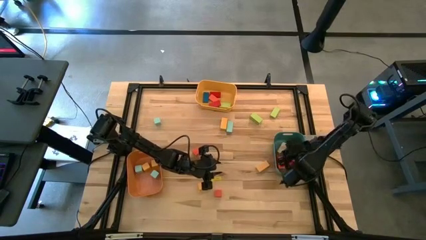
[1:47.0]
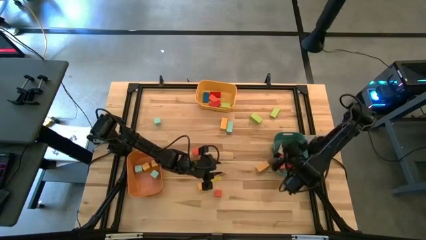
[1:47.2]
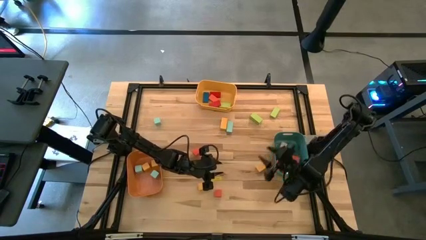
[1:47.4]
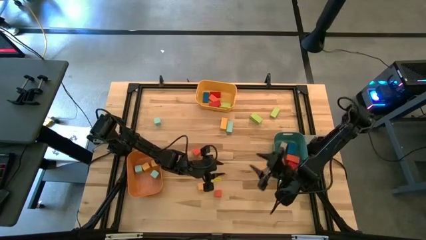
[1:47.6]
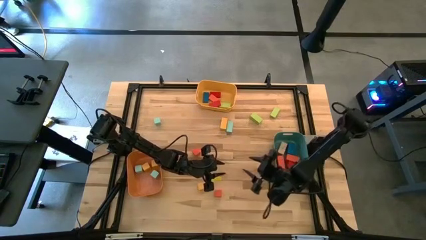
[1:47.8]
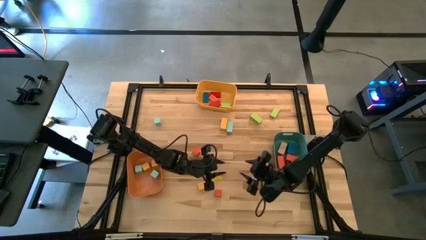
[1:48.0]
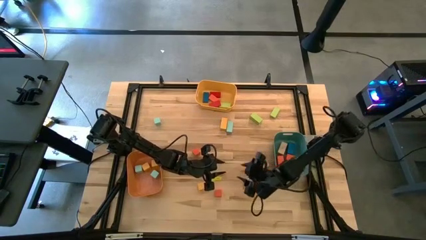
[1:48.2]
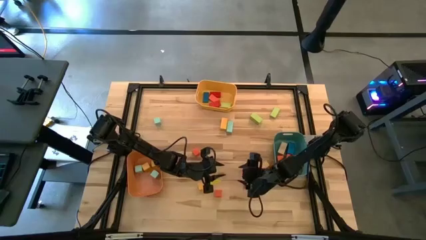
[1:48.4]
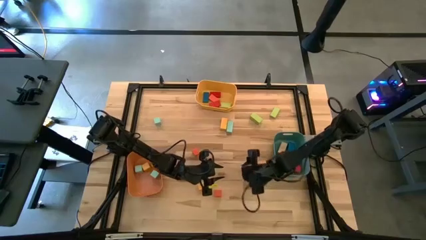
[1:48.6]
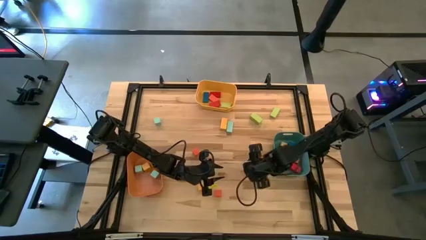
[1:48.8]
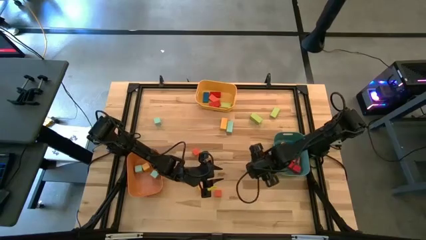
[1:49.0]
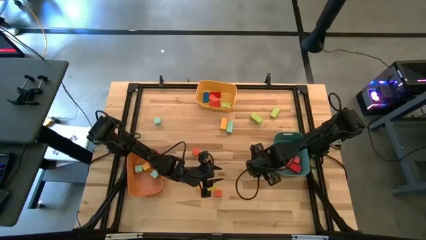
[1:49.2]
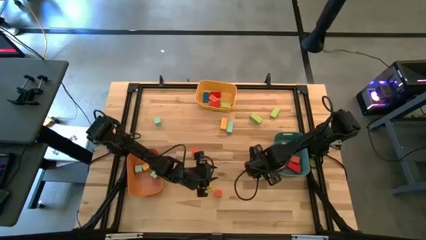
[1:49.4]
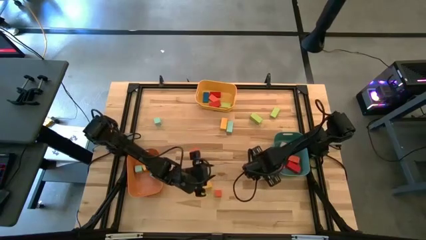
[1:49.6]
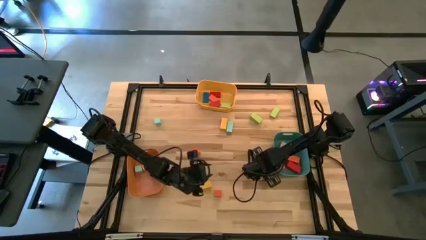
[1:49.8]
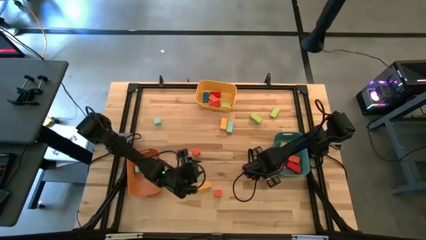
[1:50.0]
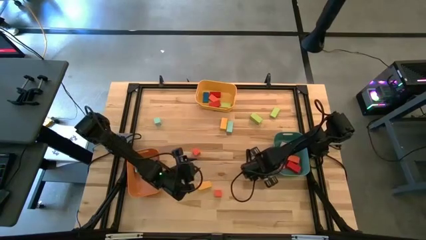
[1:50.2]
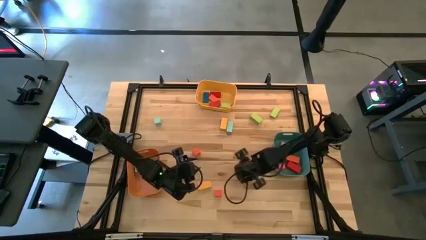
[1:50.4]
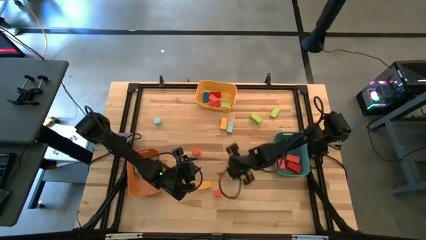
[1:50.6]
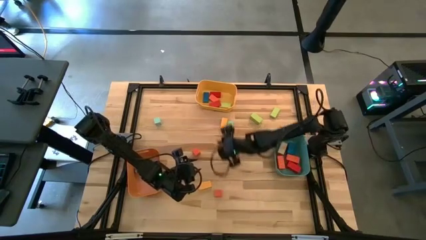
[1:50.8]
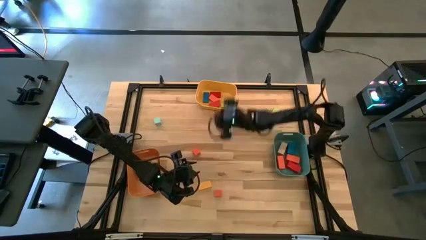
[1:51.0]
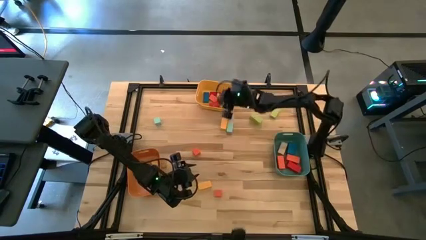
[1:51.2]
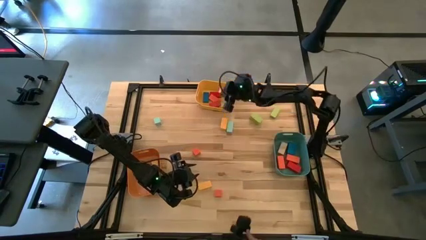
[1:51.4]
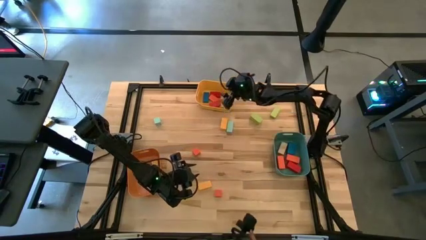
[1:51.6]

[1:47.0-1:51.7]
Task: Sort blocks by size
Put the thin yellow rectangular block into the yellow bin

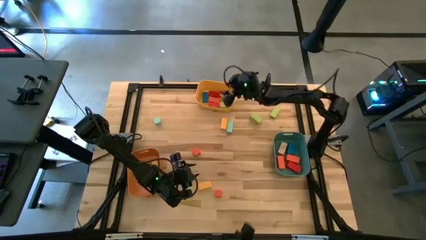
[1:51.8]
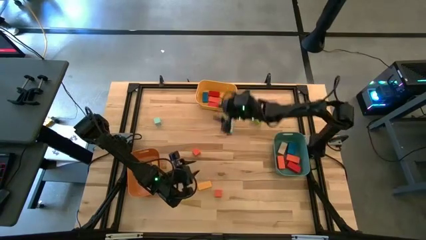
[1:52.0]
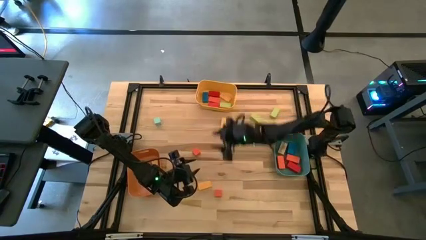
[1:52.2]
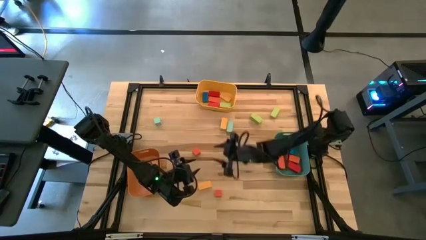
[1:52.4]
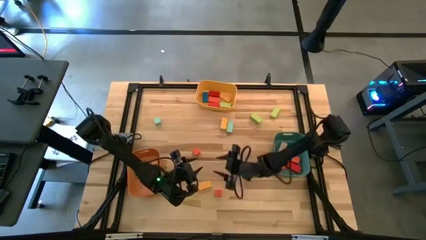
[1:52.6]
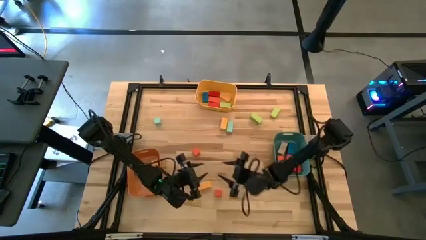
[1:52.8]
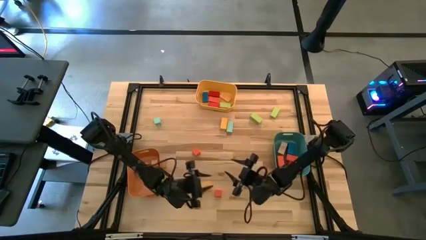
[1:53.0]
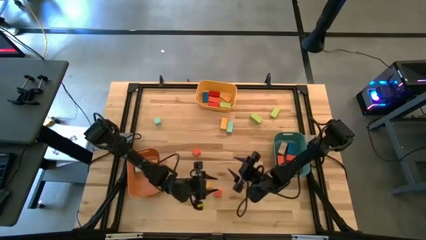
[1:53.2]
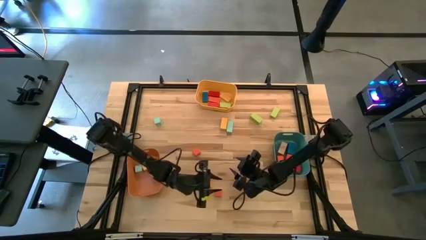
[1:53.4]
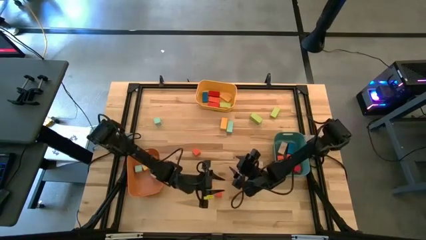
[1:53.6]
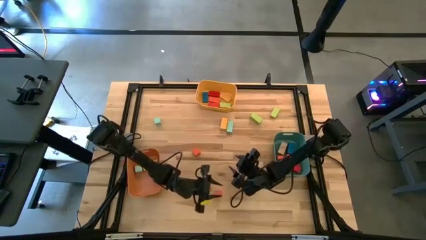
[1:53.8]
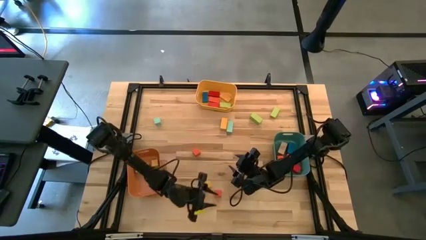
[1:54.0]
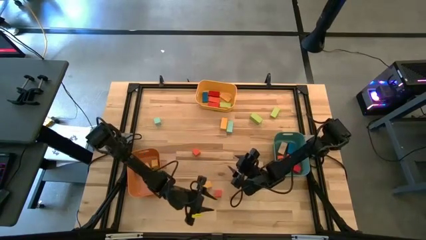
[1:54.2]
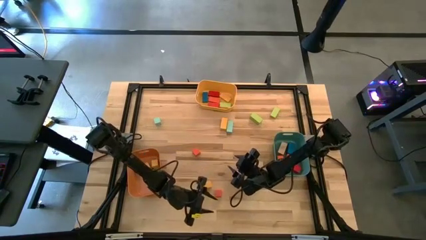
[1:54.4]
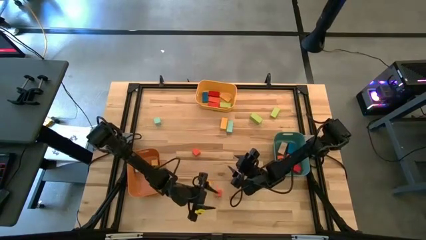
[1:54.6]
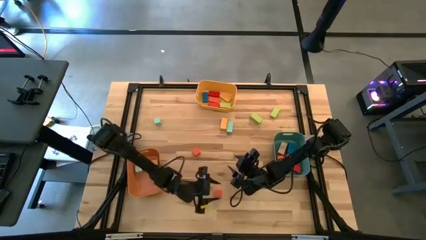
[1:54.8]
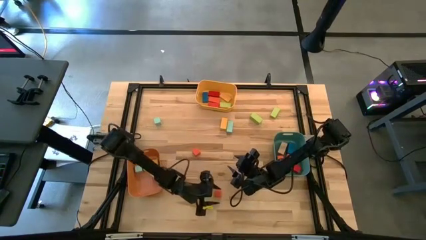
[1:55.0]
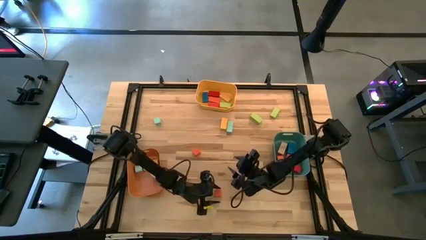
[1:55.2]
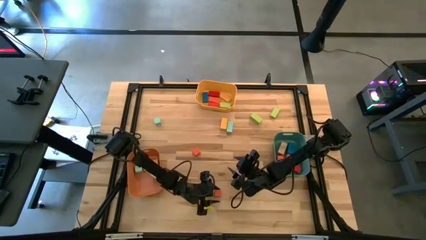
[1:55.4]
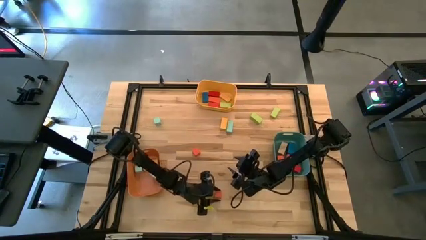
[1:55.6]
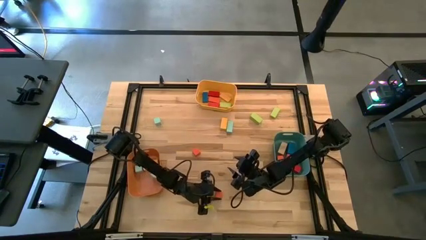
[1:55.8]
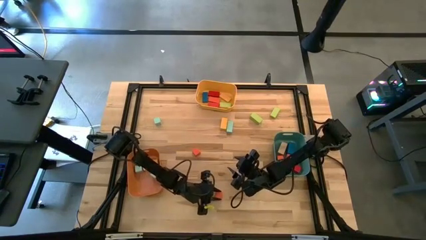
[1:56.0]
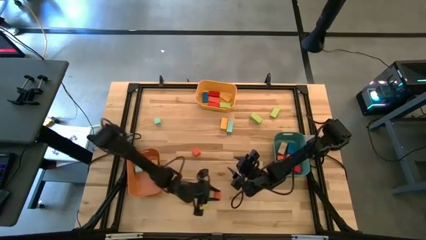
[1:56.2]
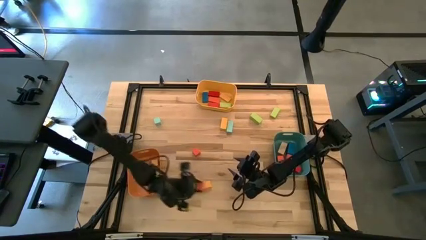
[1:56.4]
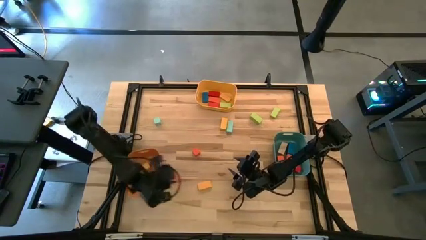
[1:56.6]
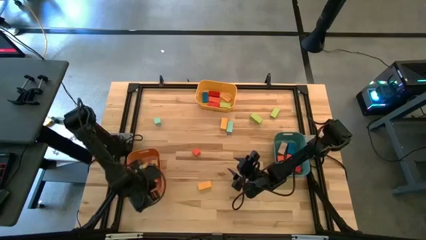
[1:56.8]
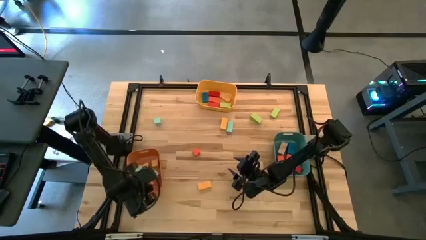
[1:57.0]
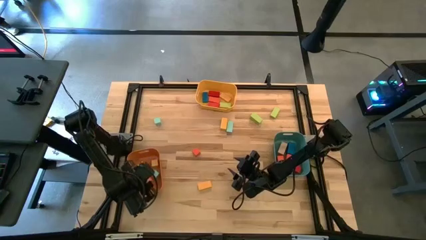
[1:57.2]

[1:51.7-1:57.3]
Put the orange square block into the orange bin

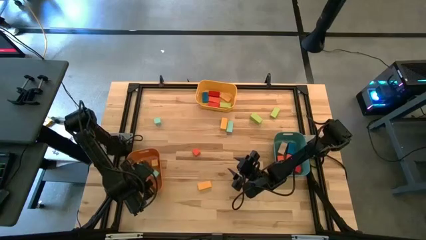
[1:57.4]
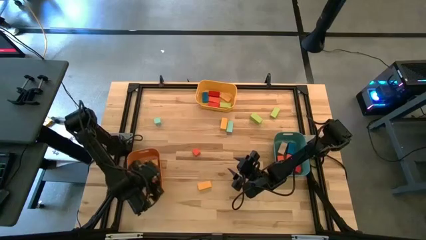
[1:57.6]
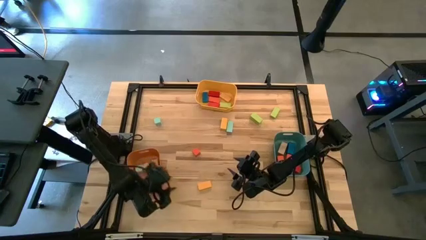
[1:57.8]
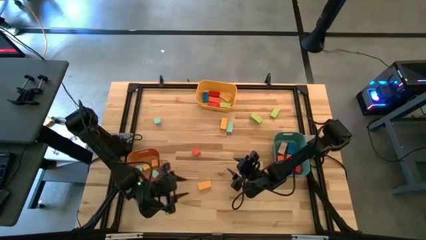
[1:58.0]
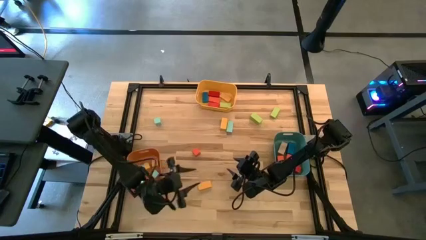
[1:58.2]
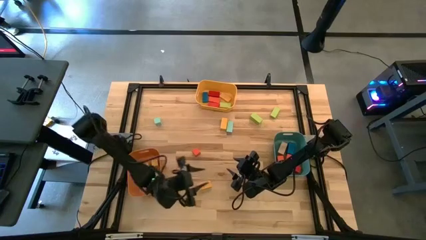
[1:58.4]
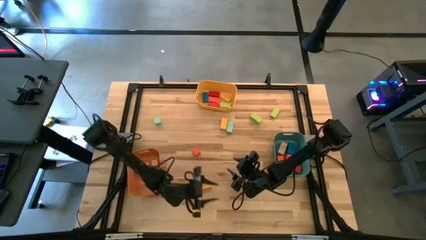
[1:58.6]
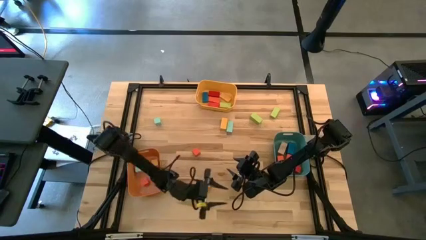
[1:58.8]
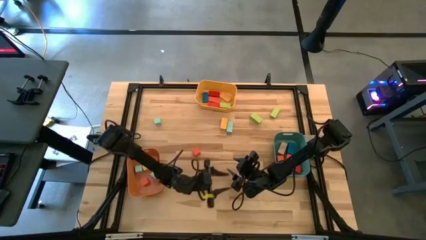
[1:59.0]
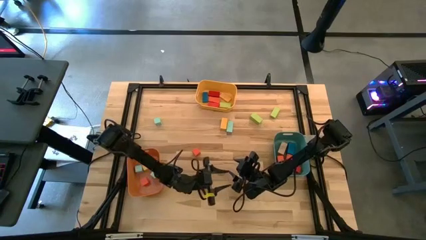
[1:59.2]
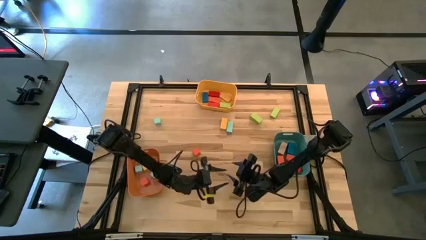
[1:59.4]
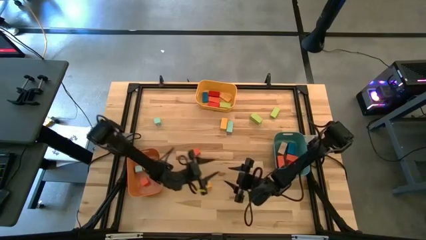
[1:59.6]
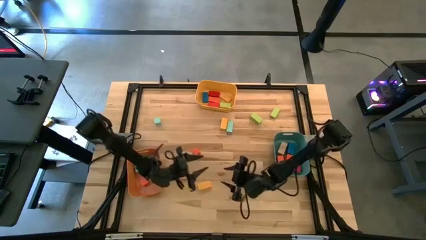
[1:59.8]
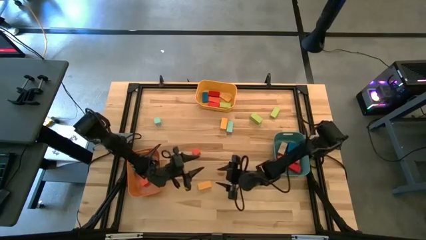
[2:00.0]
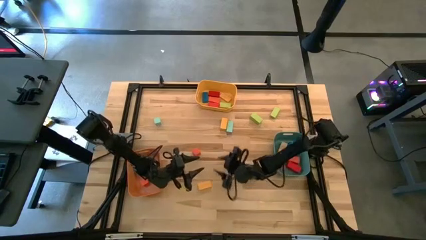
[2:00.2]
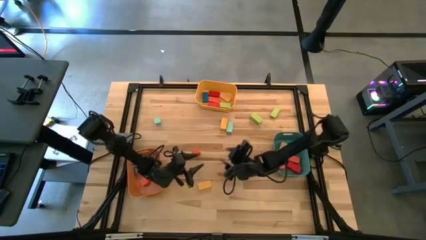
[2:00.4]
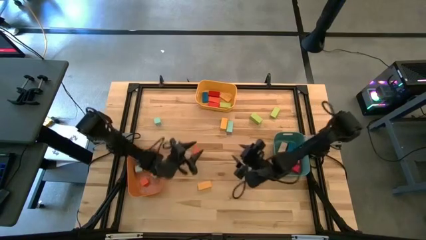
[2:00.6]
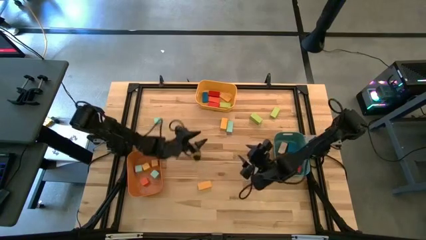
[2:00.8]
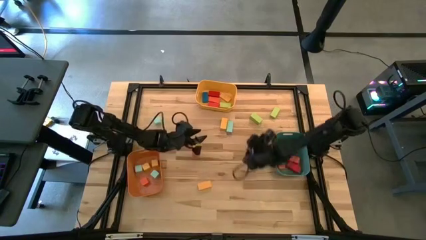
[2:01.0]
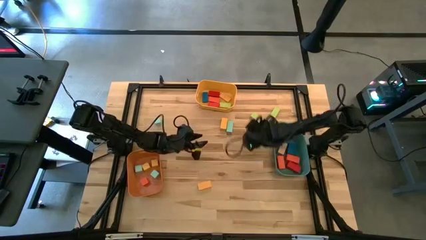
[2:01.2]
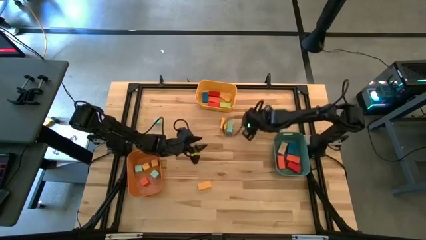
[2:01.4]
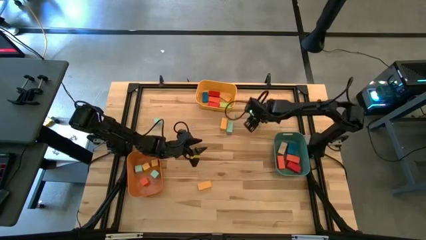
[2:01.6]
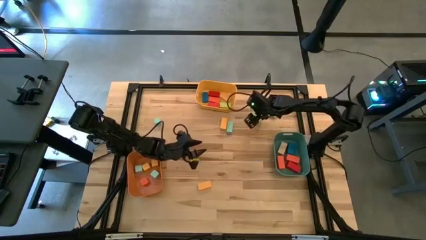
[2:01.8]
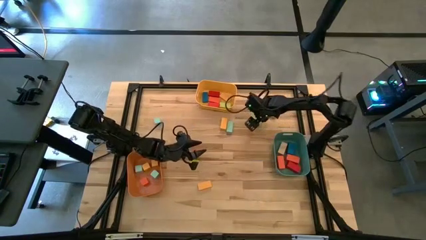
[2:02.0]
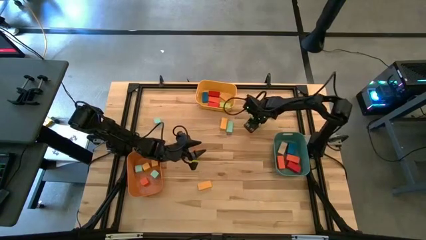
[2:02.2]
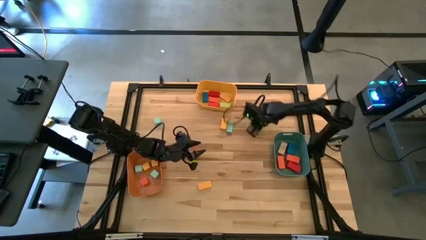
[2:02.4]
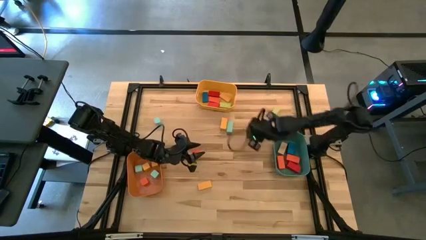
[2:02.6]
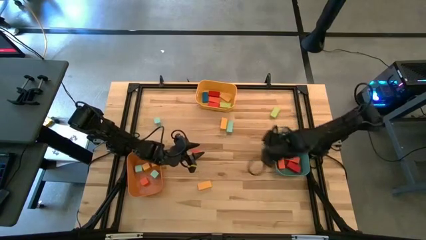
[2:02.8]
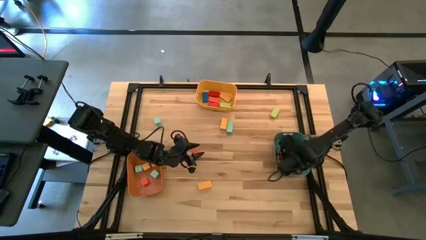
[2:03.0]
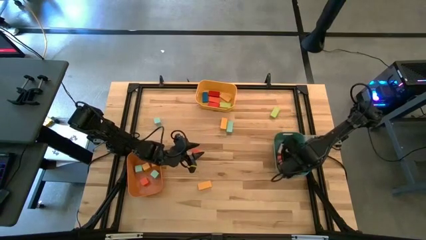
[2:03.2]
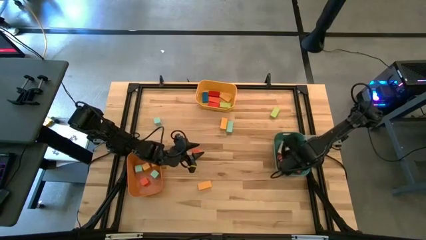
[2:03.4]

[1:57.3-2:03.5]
Put the thick green rectangular block into the green bin
